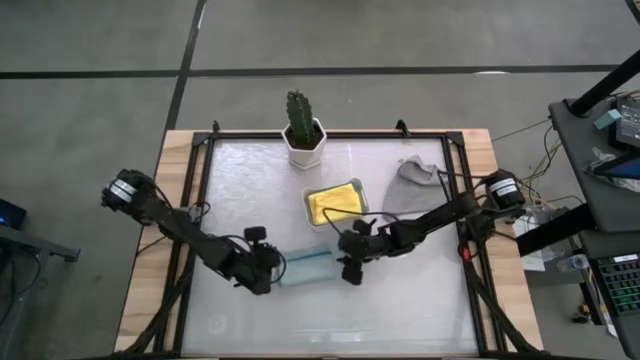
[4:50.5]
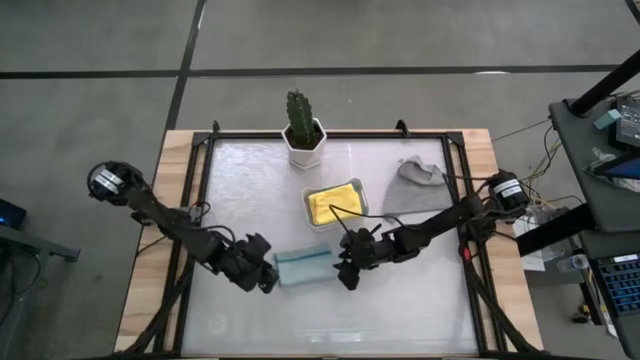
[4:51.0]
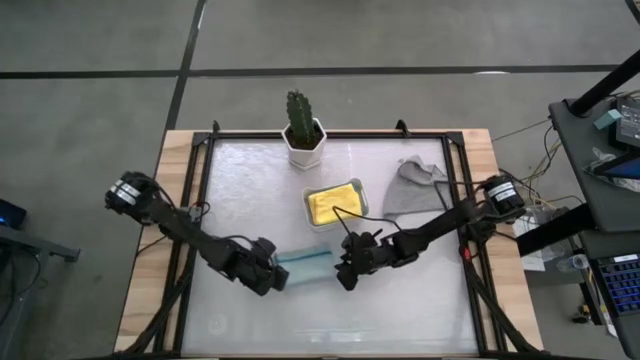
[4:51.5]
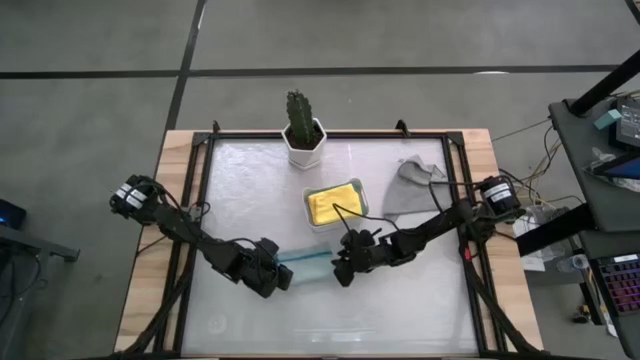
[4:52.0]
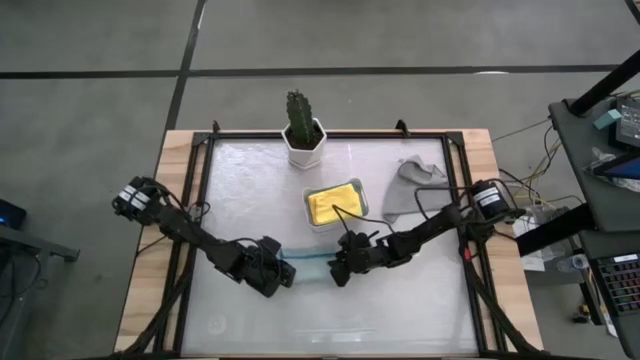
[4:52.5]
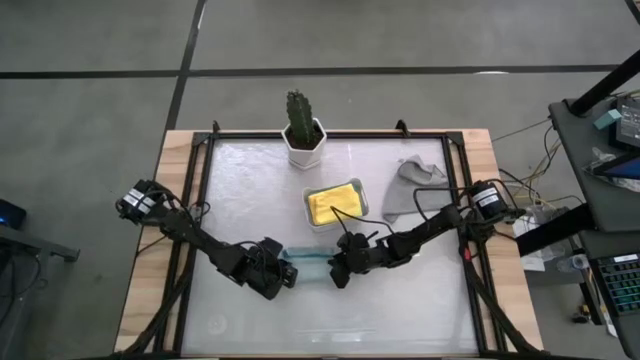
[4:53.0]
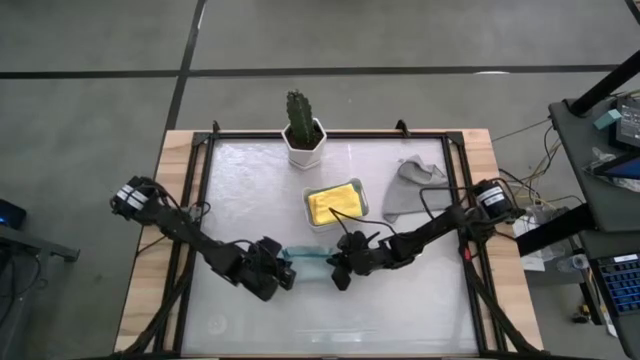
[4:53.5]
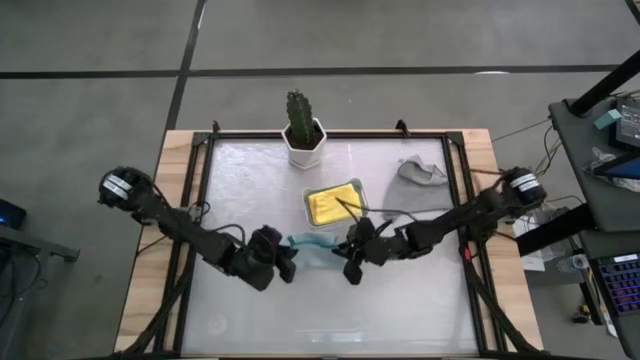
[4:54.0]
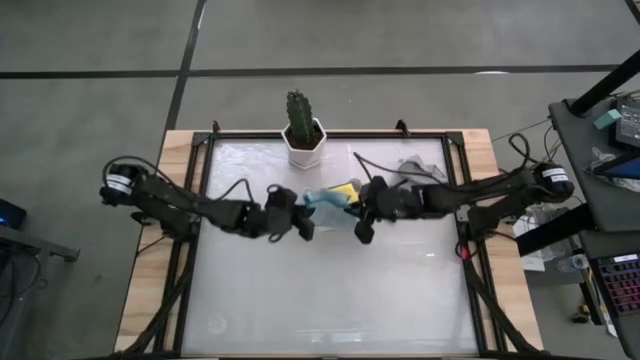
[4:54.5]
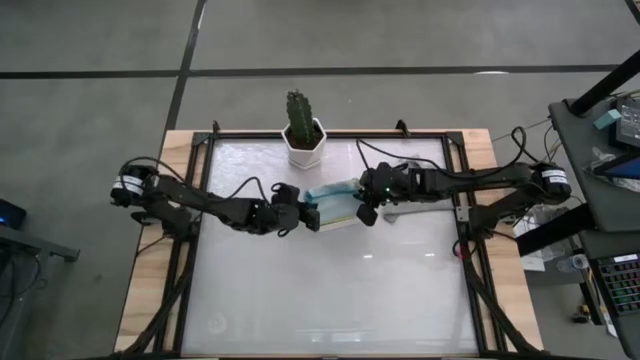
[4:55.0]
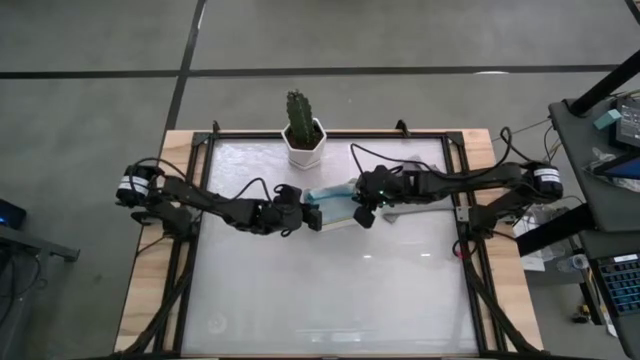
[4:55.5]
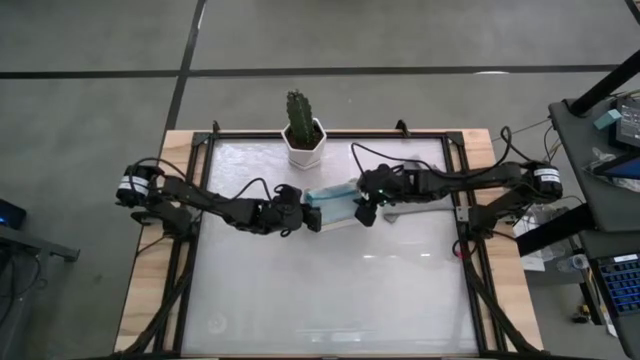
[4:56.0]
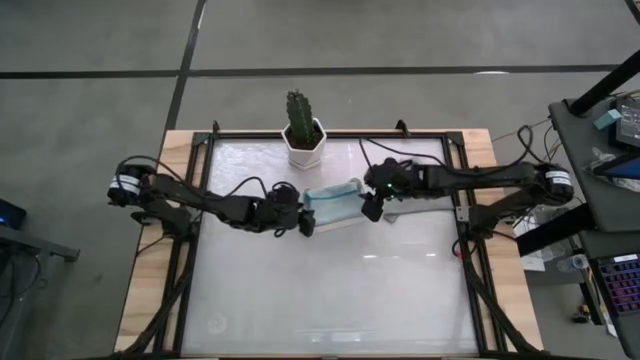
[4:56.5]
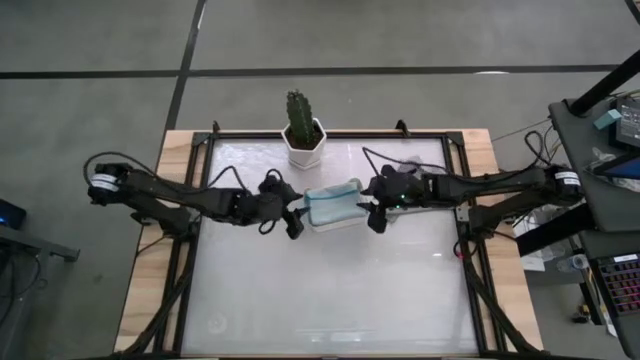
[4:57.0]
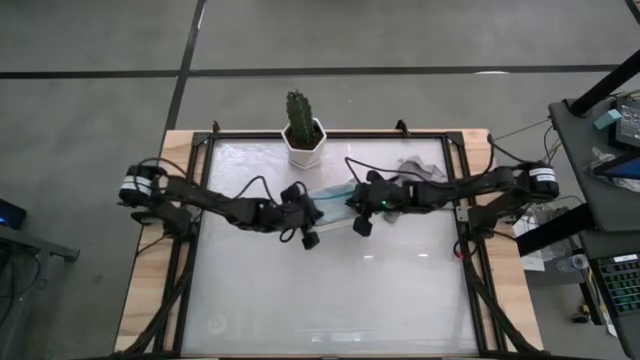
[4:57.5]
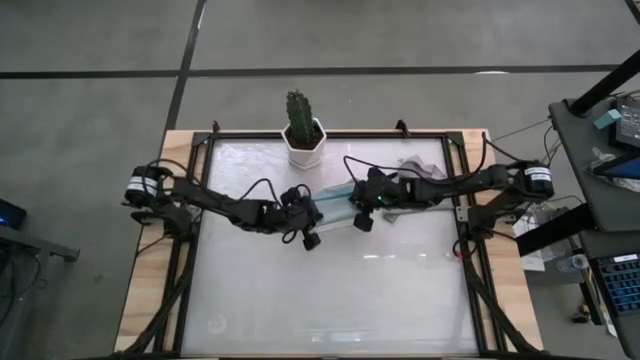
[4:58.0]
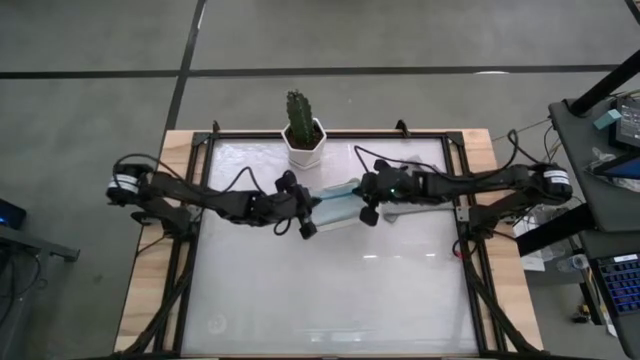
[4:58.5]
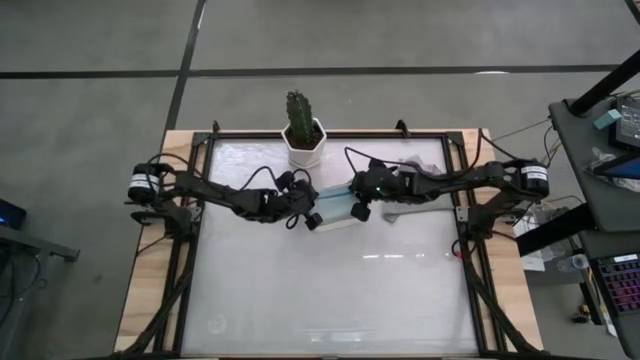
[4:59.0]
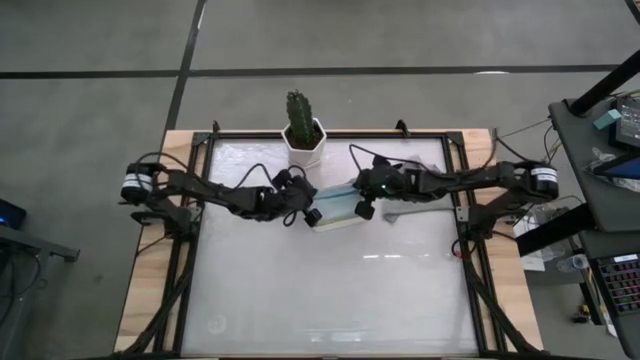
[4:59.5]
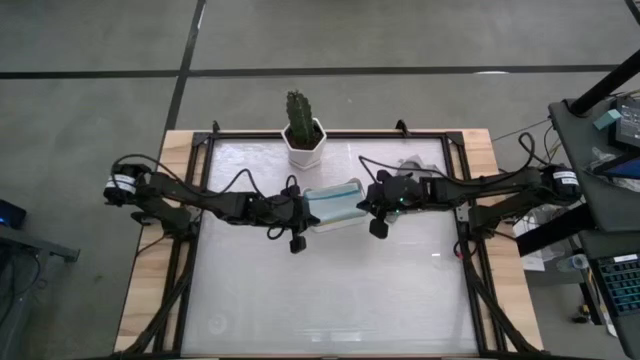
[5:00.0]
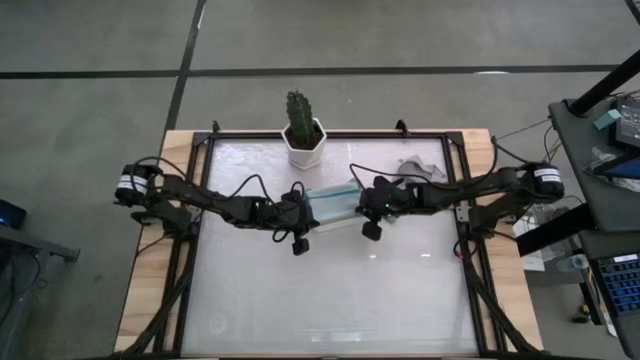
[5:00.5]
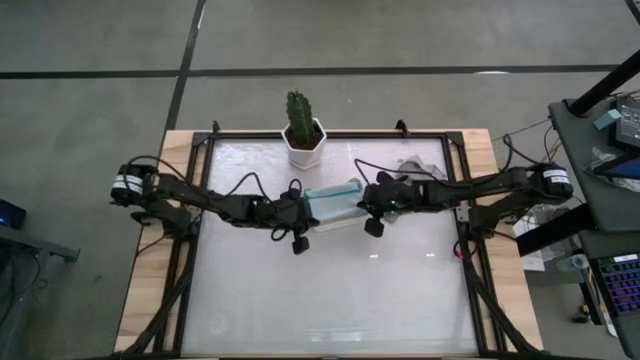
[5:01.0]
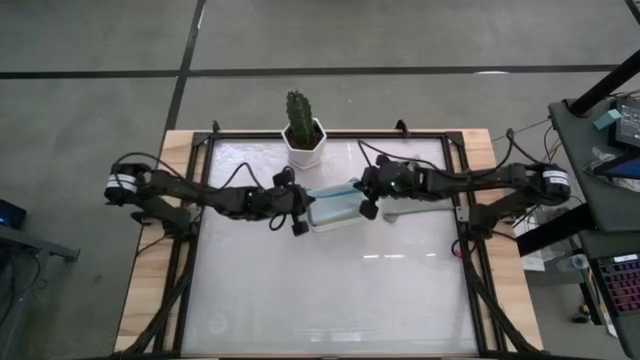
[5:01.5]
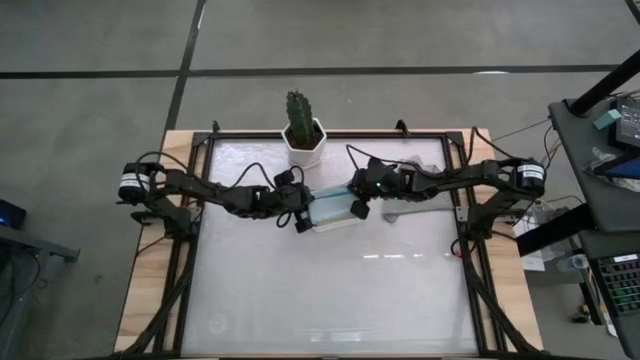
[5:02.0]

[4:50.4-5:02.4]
Task: Fold microfiber towels
Put the light blue towel into the bin

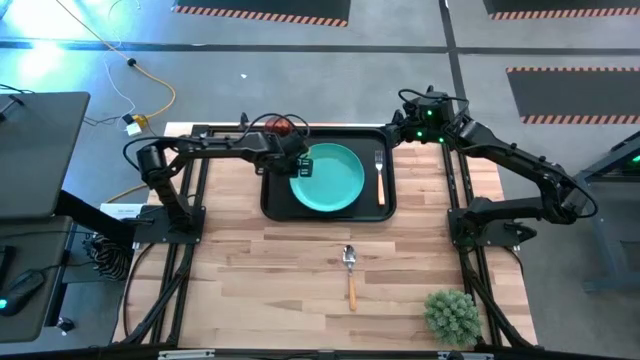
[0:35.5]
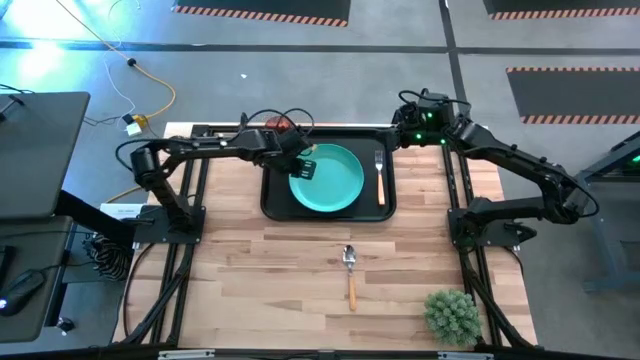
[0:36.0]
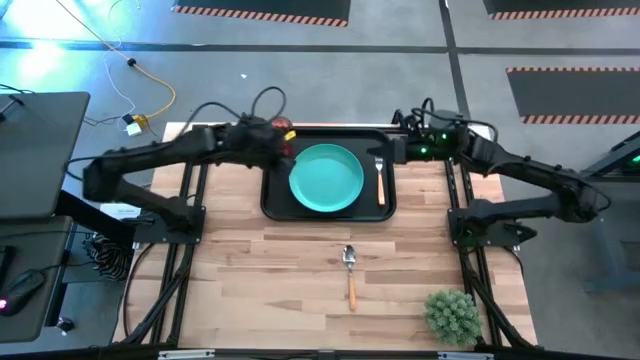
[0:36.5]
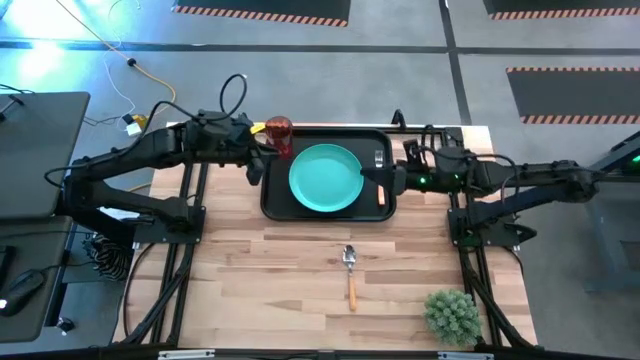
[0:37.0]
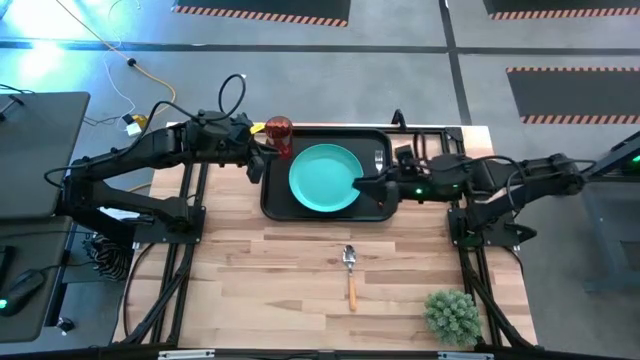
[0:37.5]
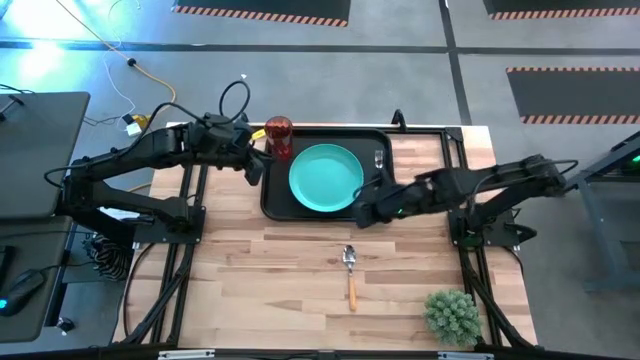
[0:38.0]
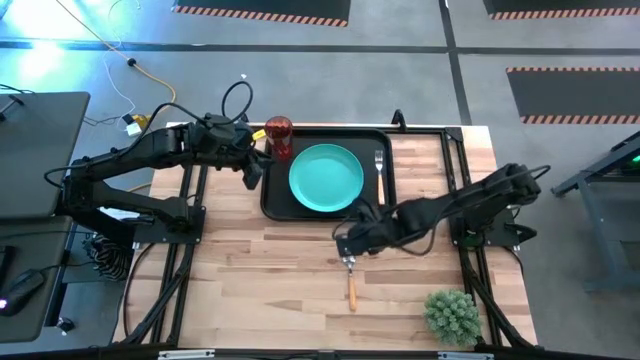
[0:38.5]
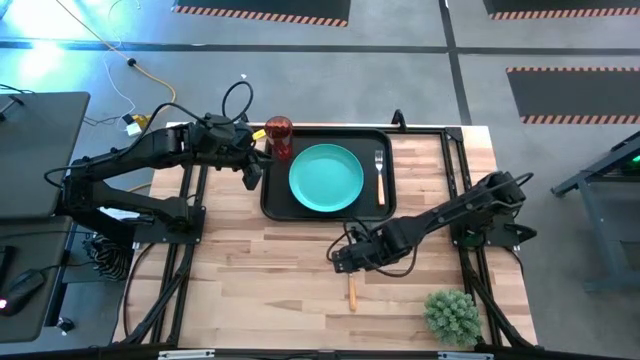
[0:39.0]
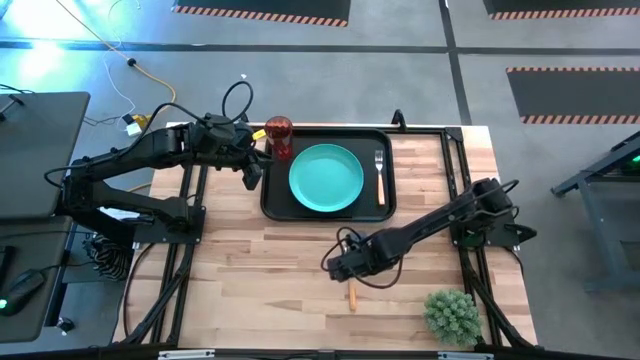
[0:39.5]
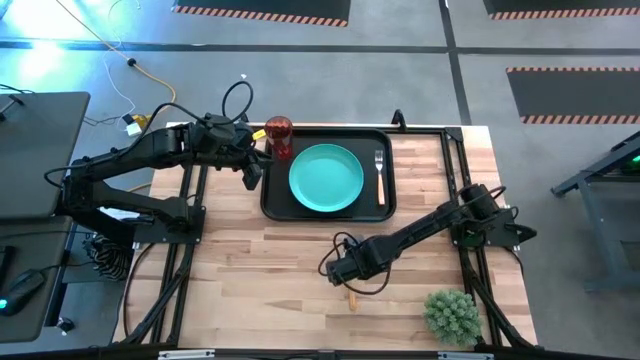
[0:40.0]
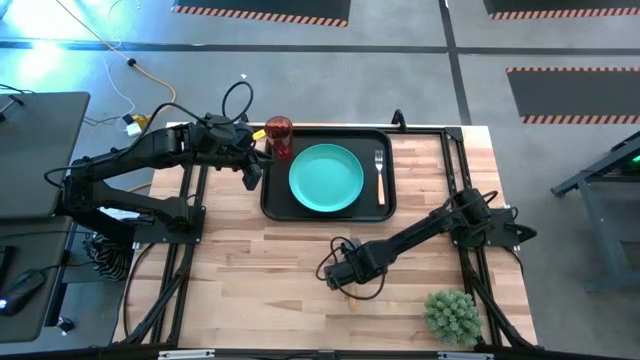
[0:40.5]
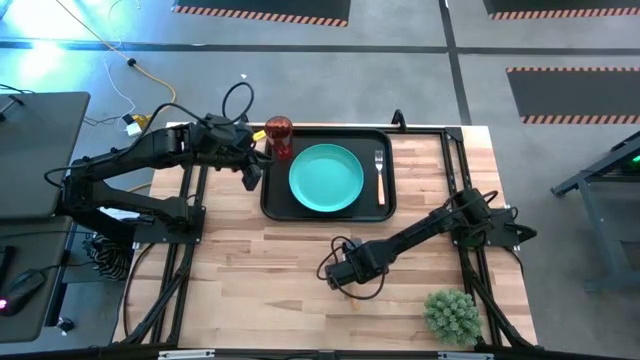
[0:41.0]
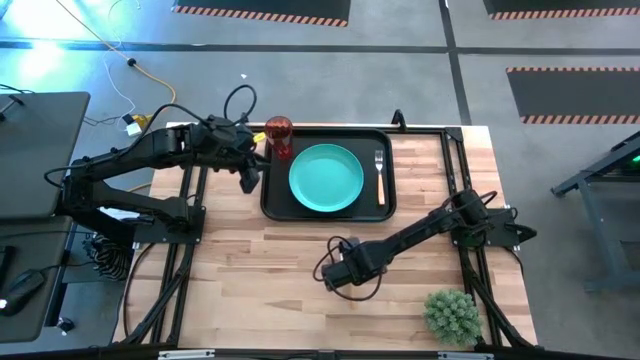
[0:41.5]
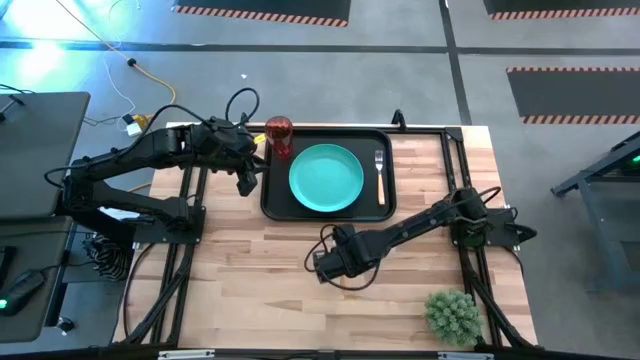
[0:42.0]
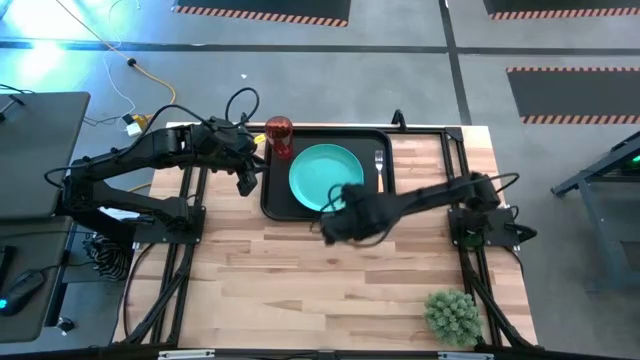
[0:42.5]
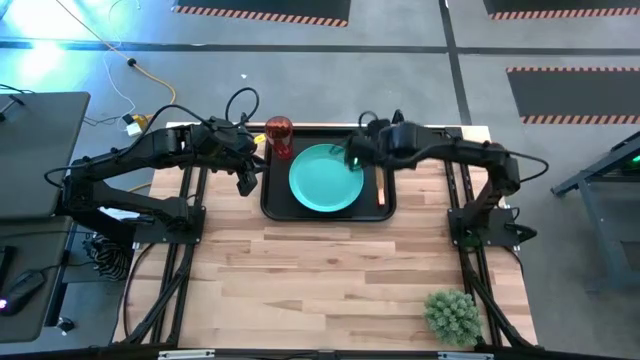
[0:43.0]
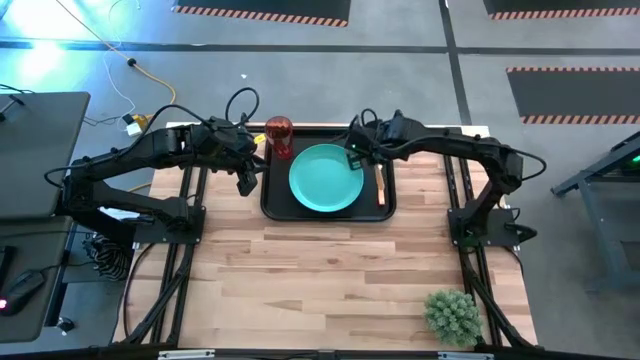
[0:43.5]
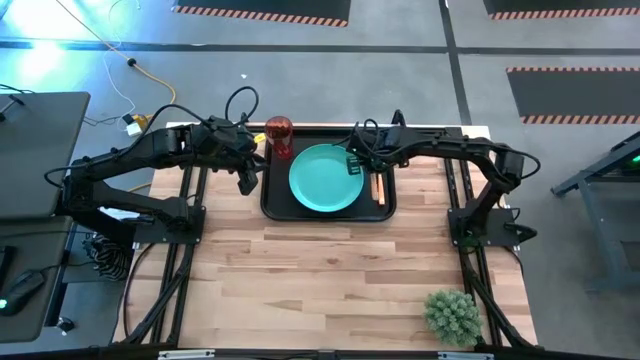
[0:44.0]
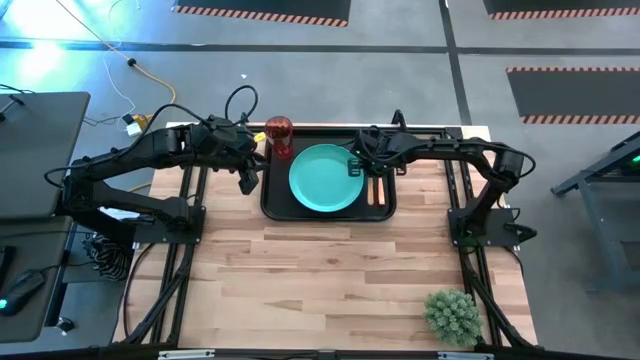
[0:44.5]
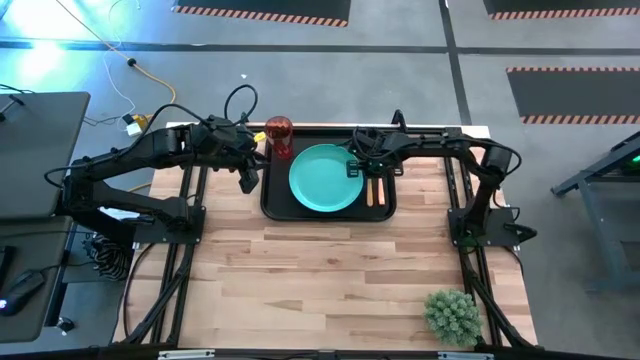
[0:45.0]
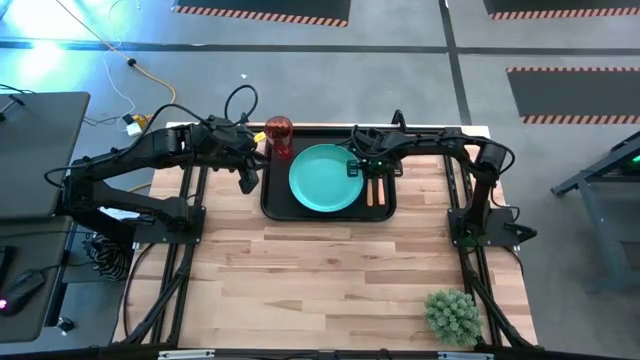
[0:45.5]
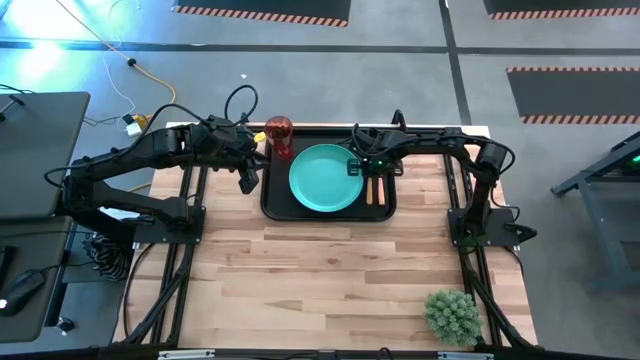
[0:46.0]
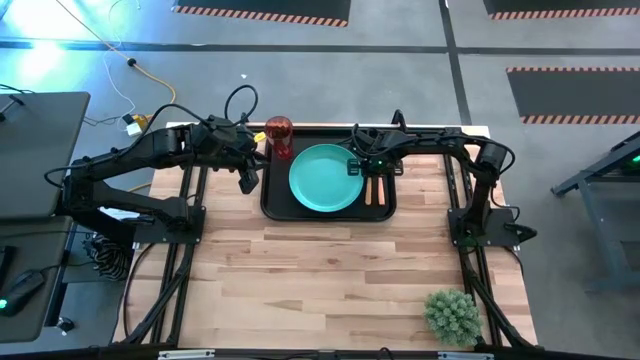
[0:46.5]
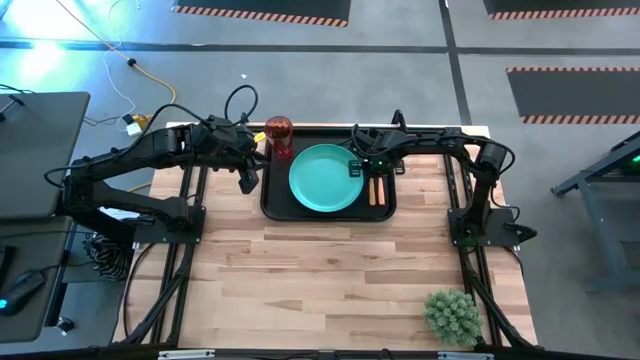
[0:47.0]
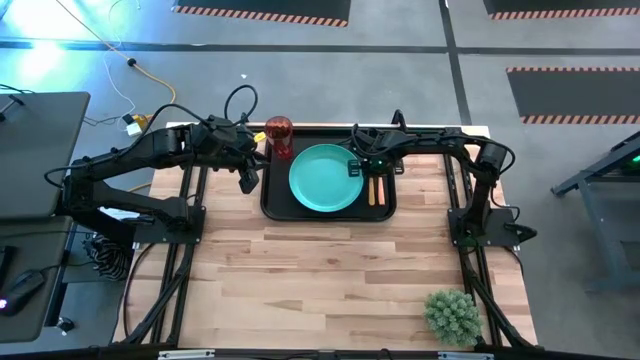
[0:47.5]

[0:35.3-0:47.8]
Task: Pick and place plate/cup/fork/spoon on tray
Put the orange spoon on the black tray to the right of the blue plate
